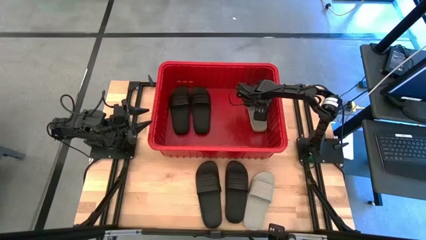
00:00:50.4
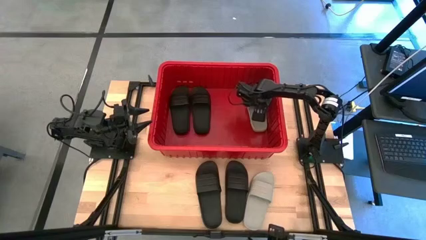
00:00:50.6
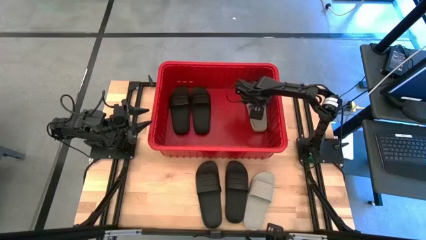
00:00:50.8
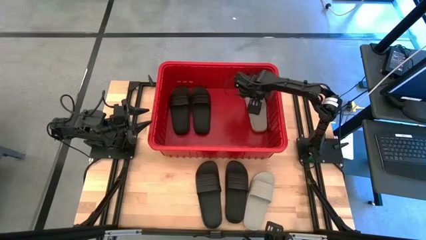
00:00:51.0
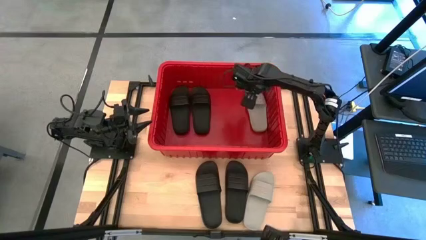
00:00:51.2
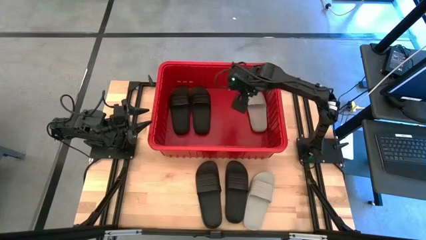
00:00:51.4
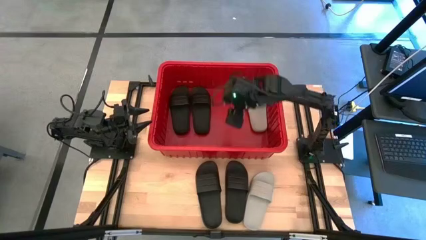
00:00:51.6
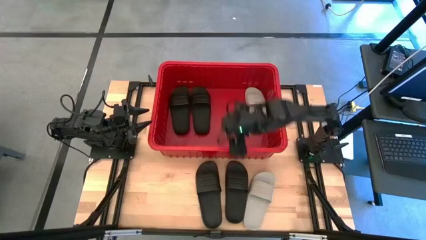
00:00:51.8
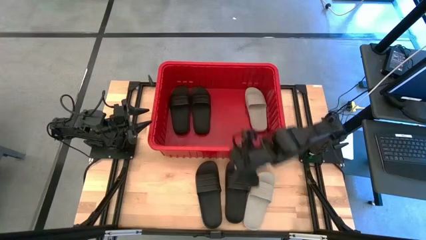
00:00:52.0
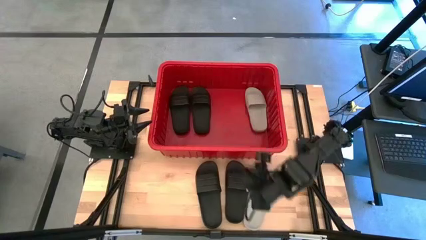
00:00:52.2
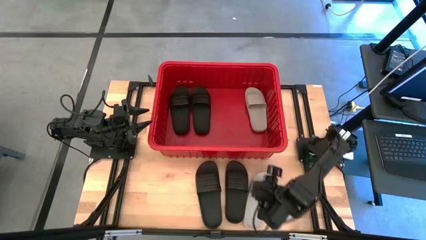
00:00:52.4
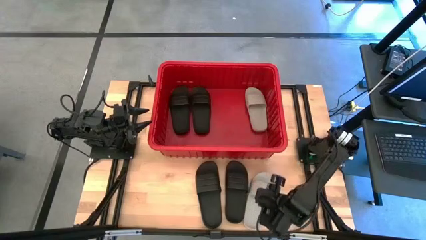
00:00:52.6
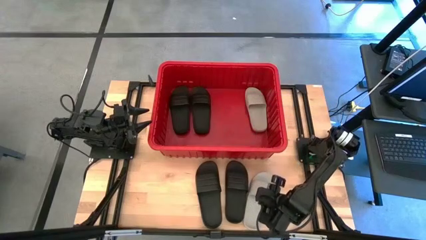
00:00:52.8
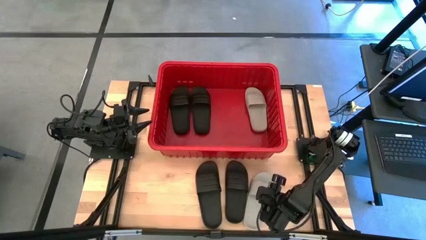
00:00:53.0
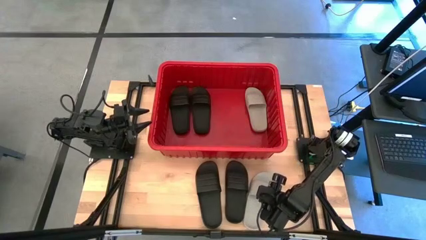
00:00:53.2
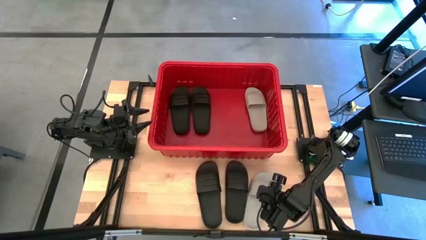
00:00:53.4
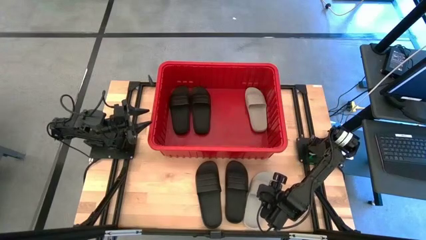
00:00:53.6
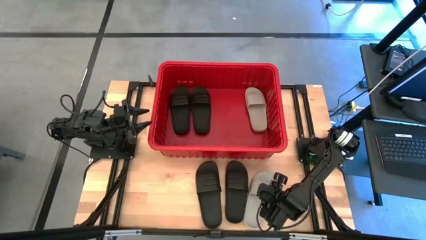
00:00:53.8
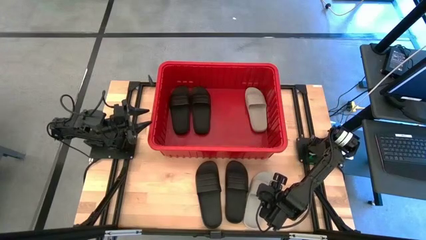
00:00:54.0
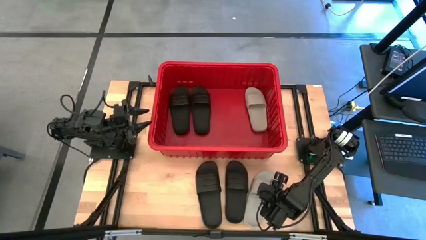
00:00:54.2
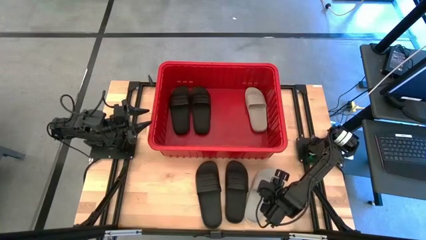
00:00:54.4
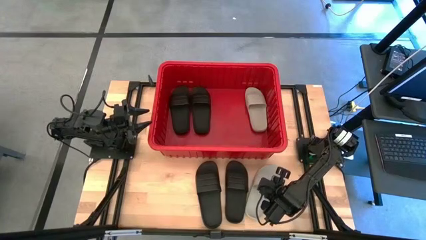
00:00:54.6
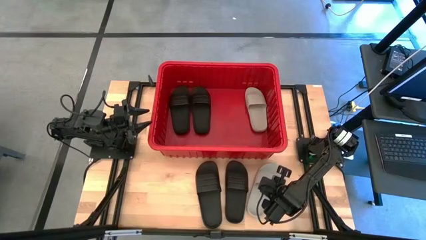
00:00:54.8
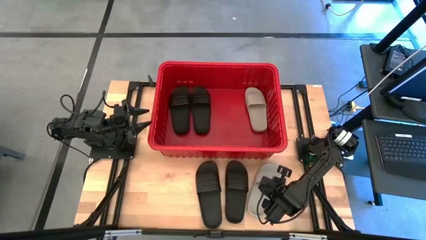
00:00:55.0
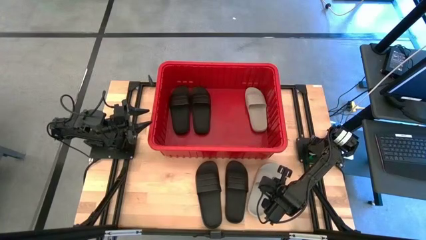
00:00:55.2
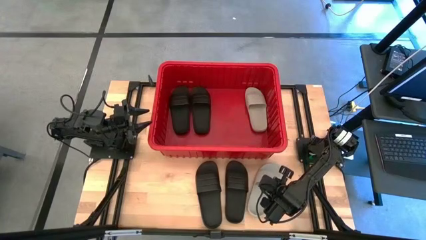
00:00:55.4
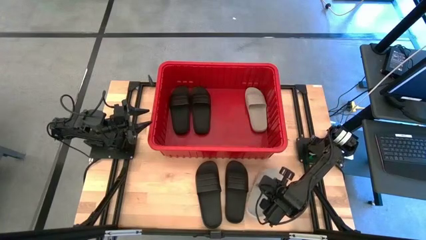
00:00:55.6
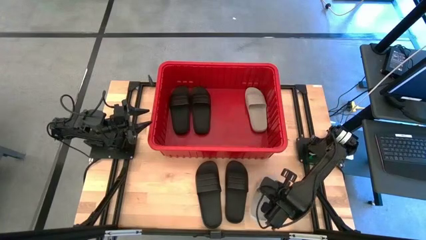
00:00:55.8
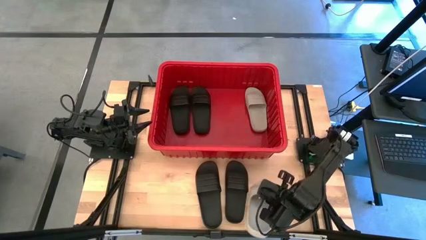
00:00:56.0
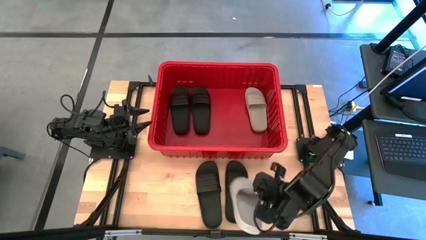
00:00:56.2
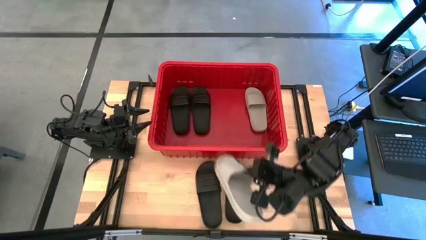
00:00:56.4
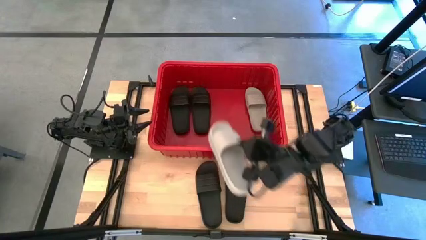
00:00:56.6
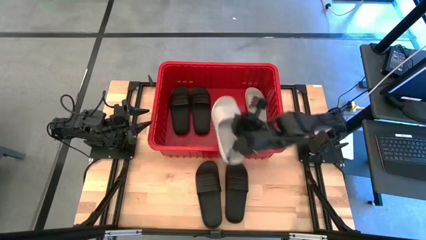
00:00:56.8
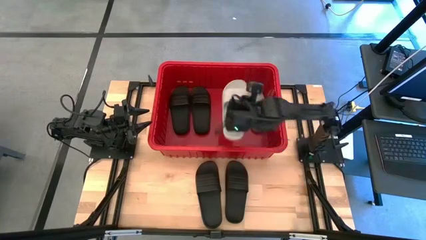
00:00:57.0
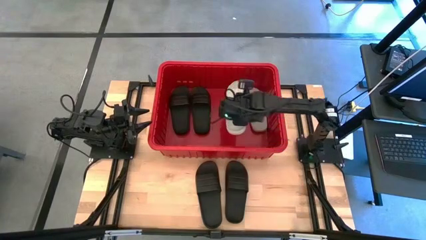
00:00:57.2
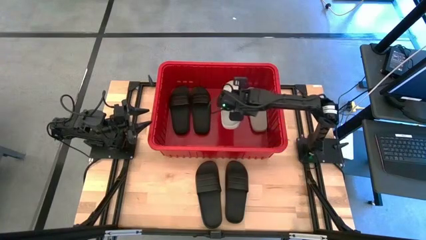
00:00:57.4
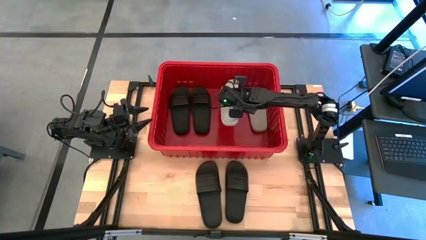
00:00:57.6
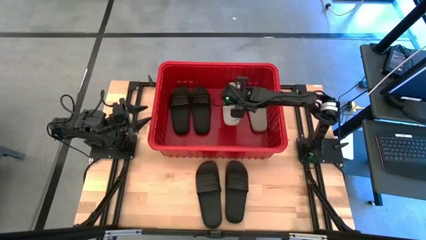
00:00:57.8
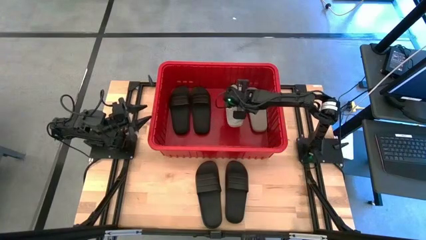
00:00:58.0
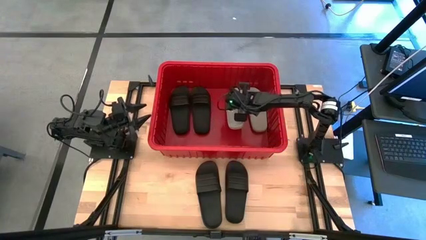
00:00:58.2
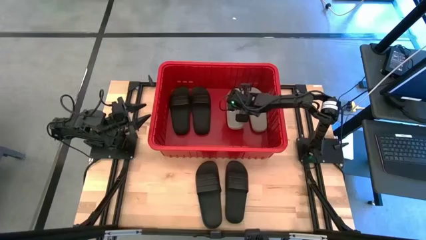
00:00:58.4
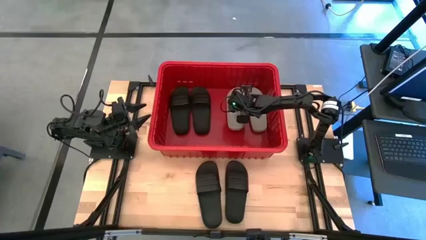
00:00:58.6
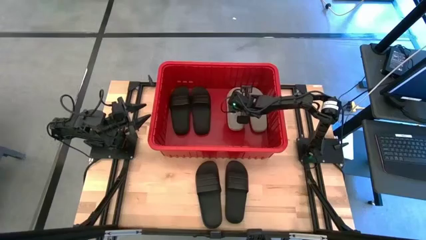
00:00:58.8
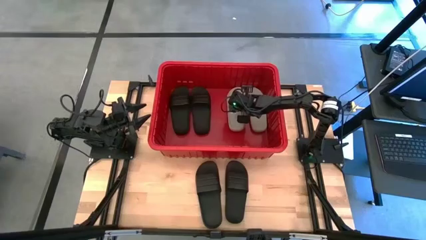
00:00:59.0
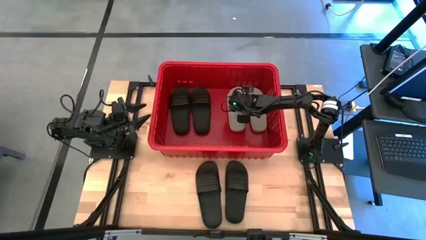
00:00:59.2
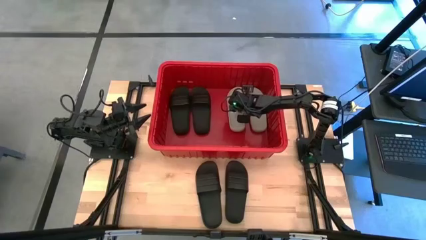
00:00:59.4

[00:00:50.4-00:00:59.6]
Task: Pick and place slides into bin
Put the white slide into the red bin

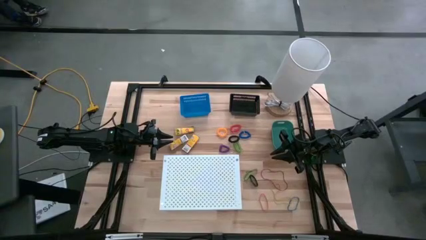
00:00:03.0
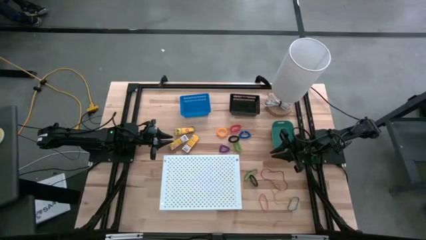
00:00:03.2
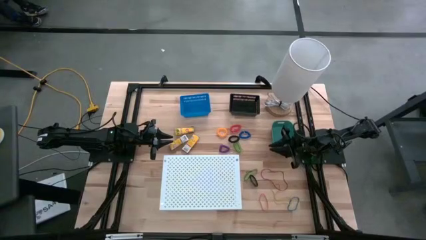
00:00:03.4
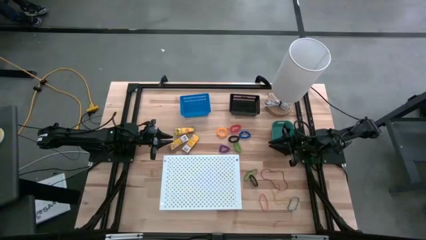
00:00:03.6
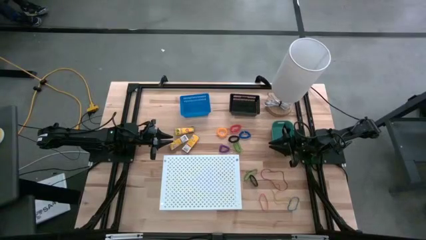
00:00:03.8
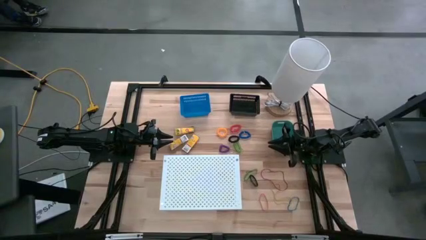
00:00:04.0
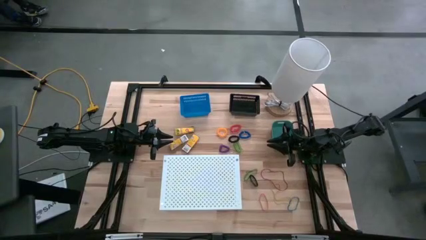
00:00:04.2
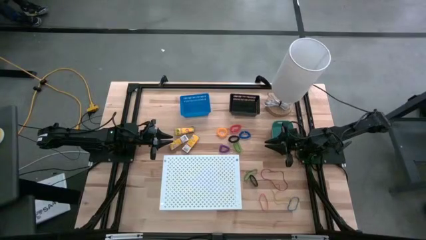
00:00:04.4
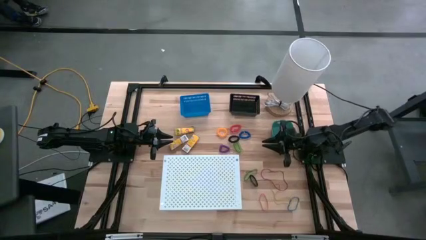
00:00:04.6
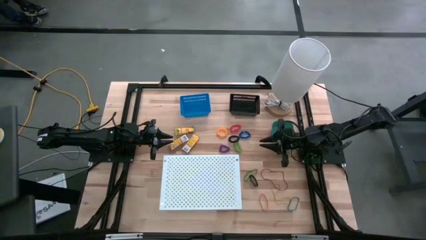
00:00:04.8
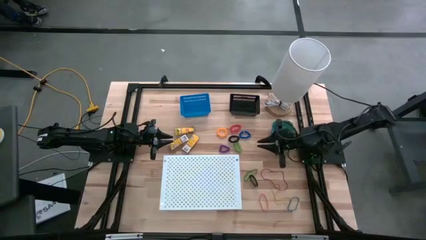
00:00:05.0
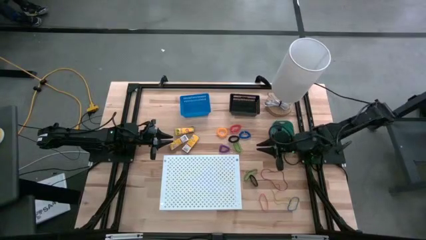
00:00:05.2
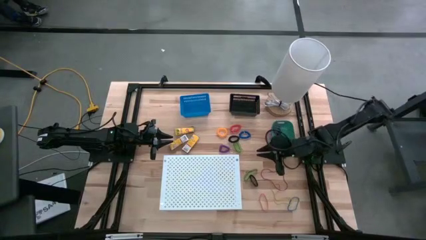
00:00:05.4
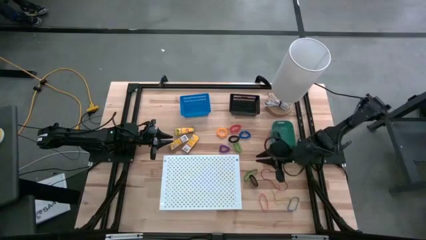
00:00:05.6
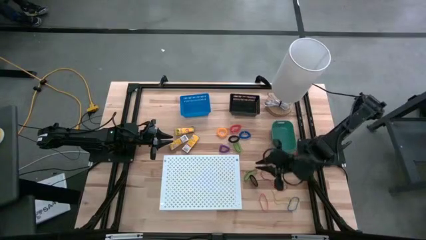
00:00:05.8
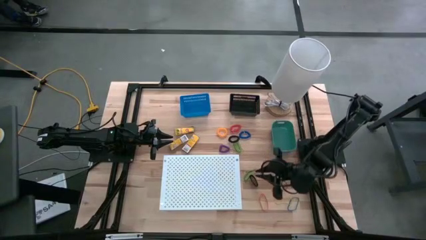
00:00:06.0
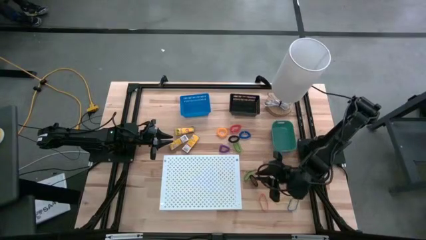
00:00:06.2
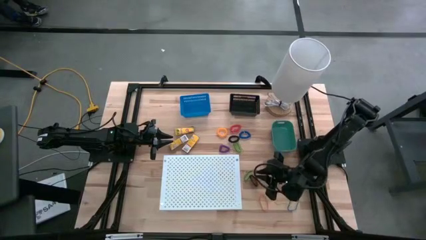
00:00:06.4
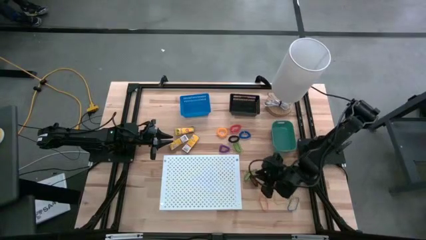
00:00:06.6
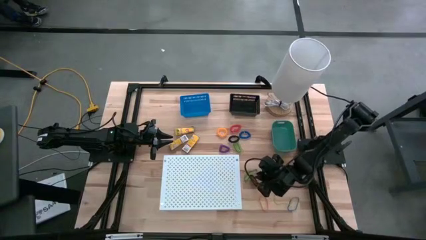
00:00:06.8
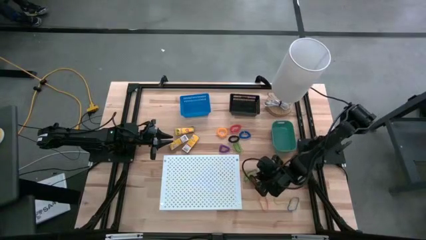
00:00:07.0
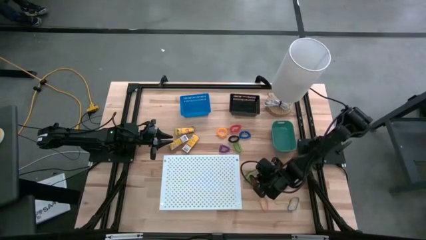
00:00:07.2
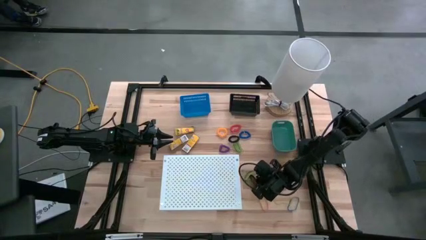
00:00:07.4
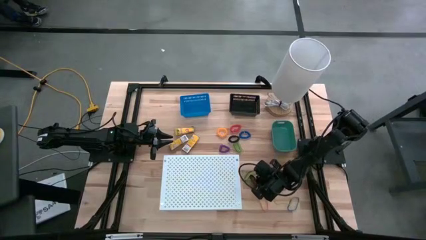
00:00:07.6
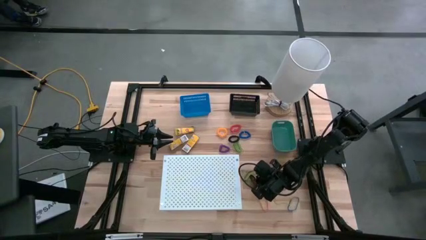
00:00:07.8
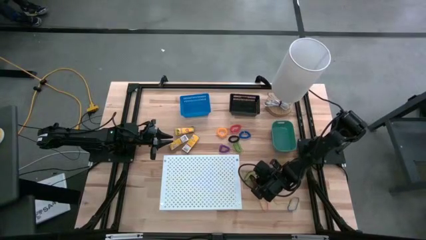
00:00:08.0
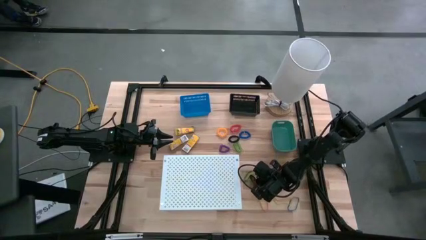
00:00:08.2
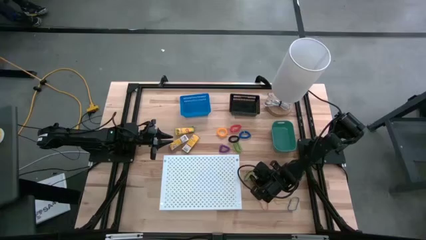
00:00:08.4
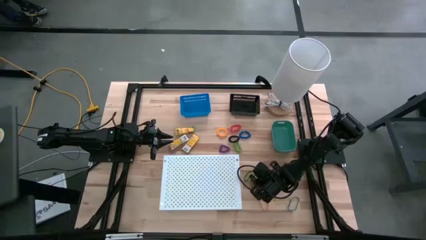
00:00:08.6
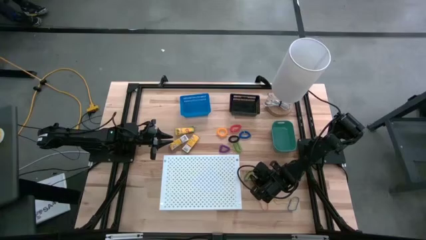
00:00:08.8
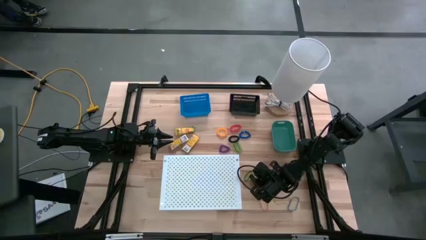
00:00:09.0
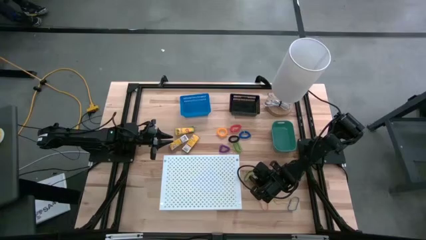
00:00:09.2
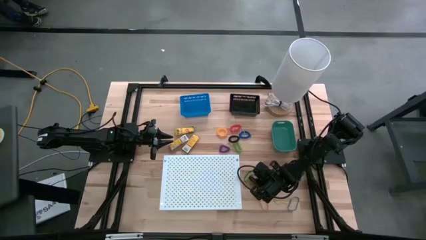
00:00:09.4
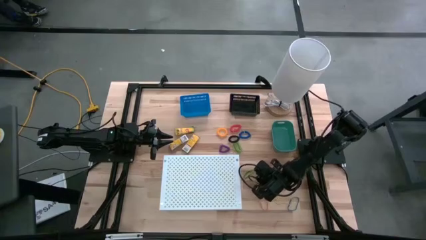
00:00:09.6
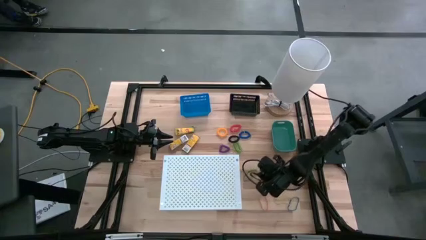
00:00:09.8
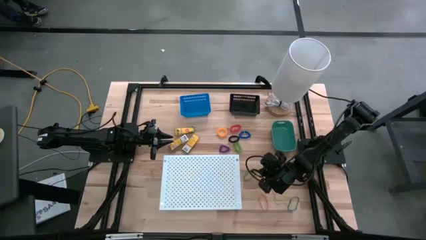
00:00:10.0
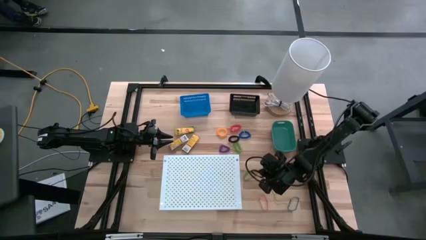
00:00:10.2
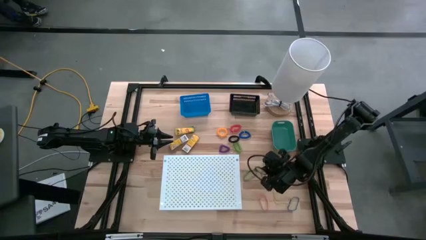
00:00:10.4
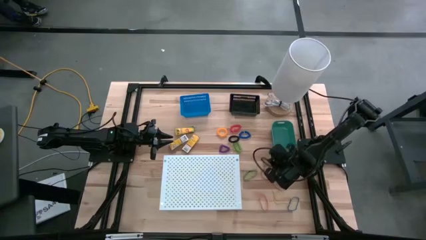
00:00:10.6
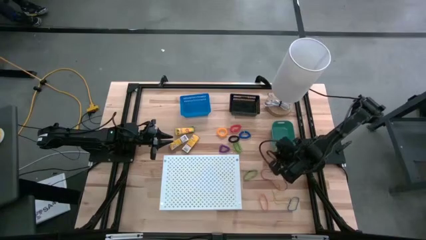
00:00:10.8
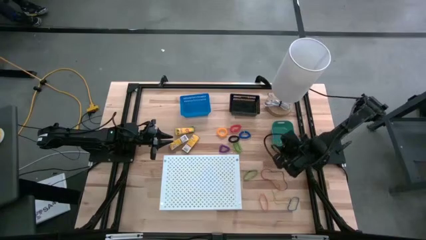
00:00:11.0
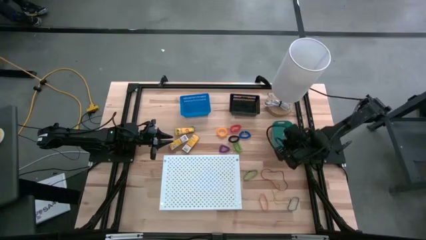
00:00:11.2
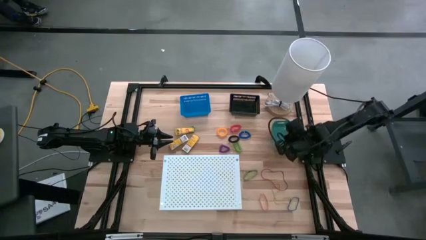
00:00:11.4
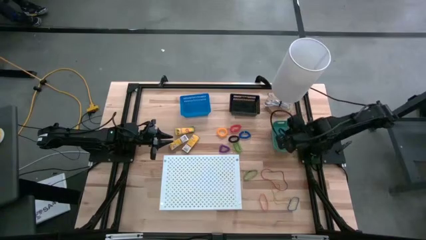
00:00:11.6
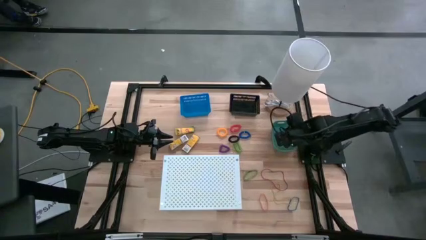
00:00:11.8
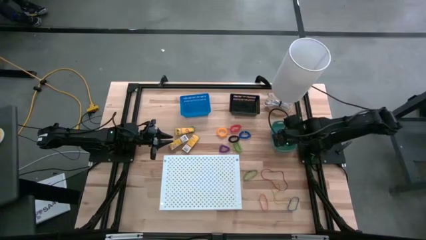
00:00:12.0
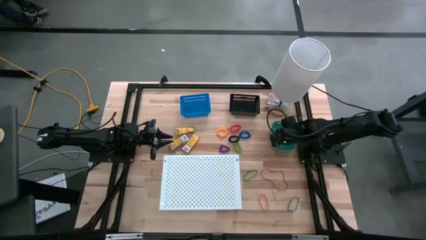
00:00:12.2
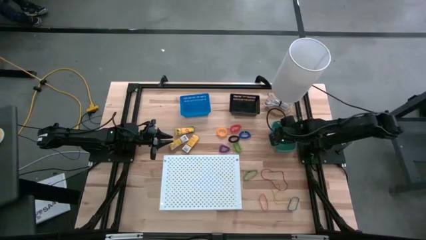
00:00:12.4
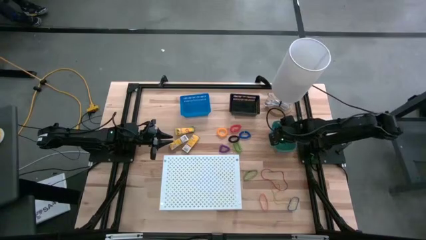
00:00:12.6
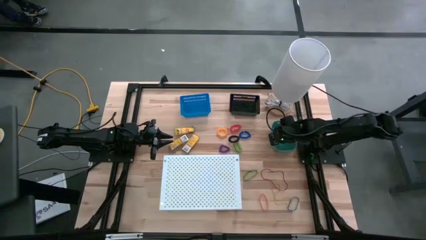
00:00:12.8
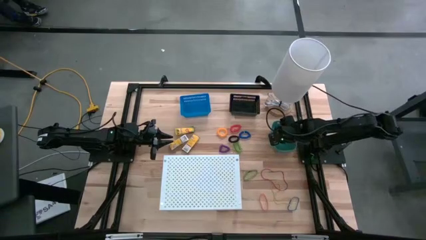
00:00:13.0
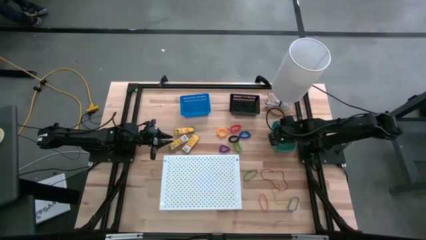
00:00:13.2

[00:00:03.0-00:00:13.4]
Task: Pick & Place Office Desk Supplies
Put the black rubber band into the green bin
